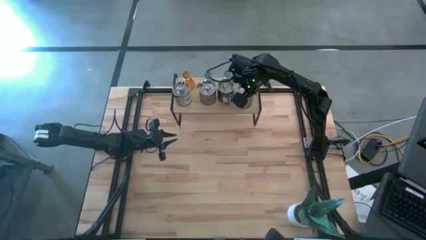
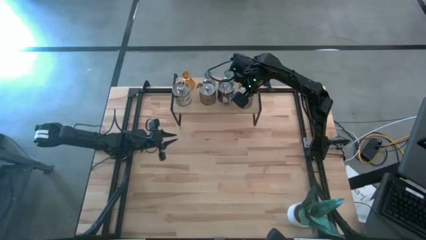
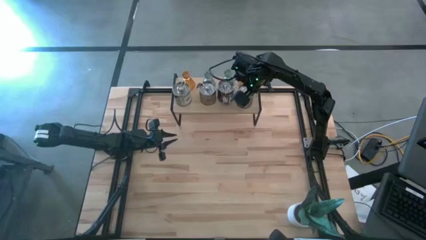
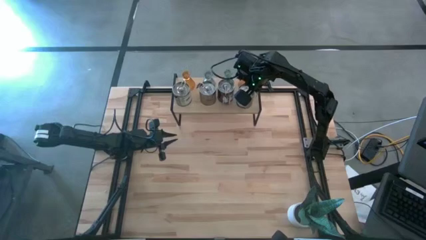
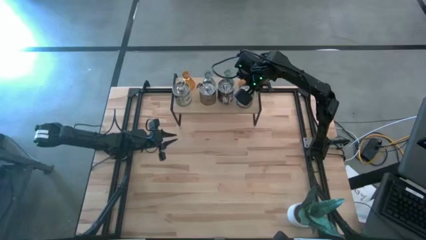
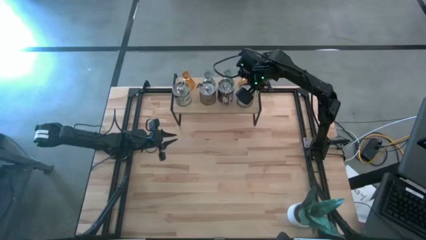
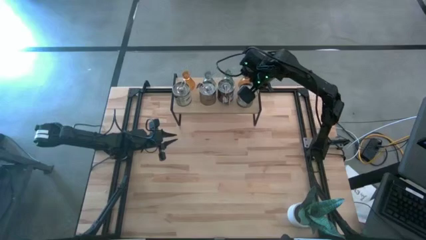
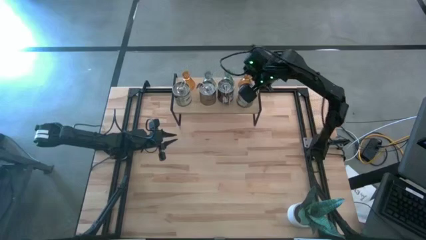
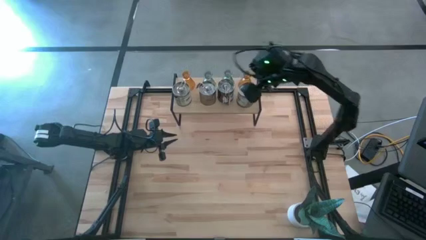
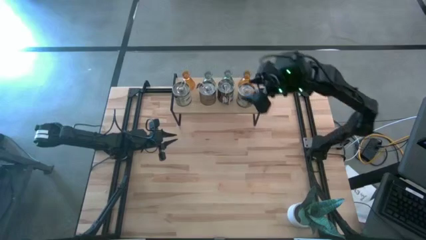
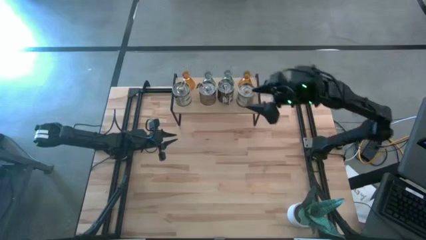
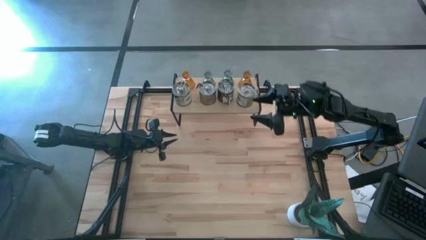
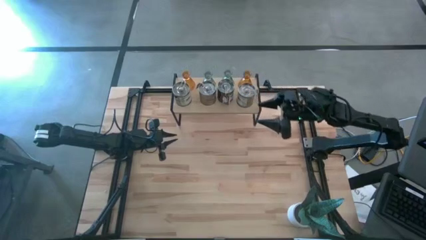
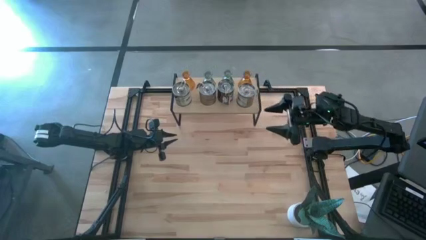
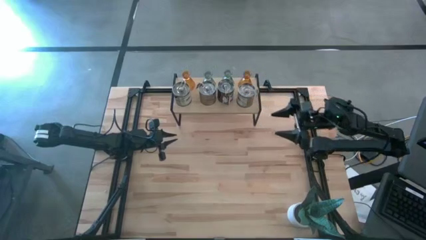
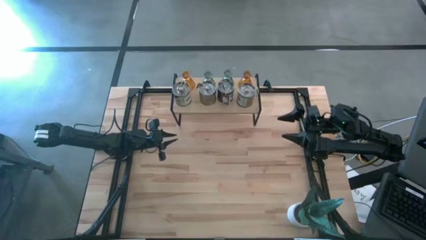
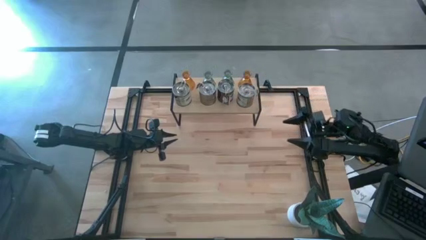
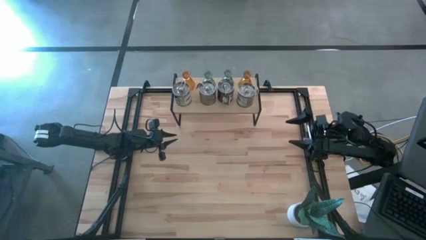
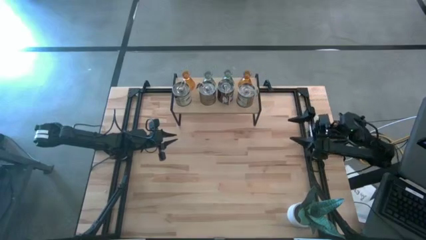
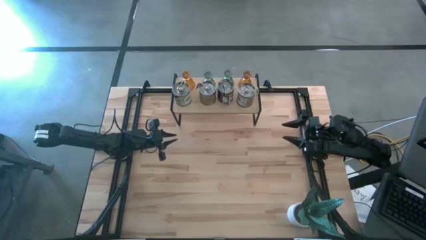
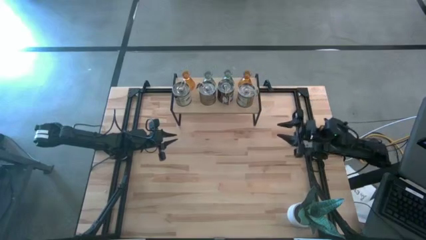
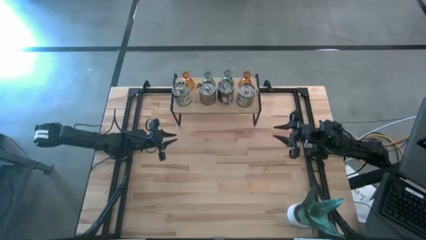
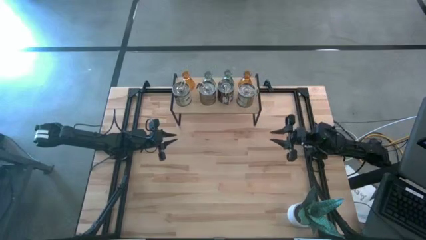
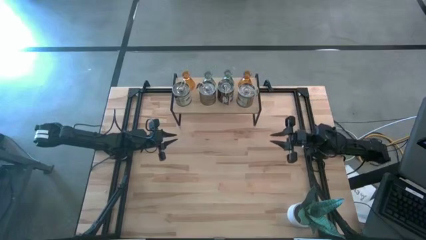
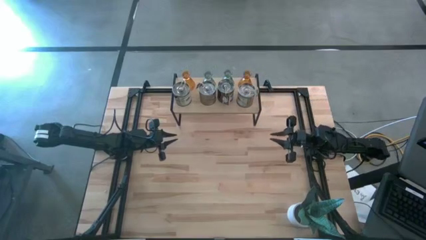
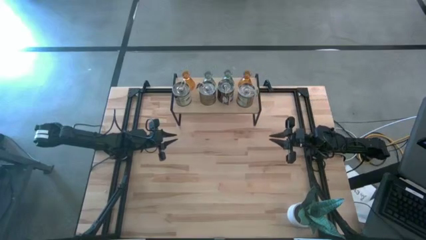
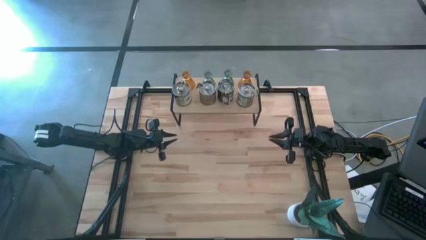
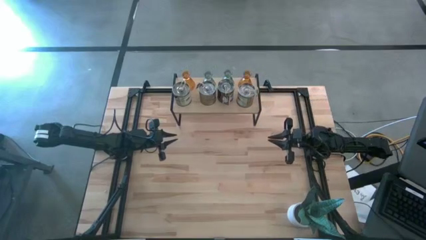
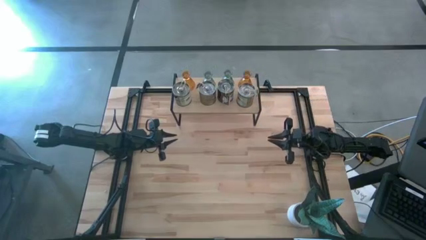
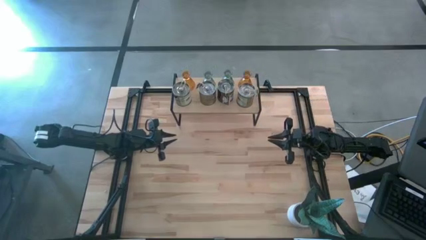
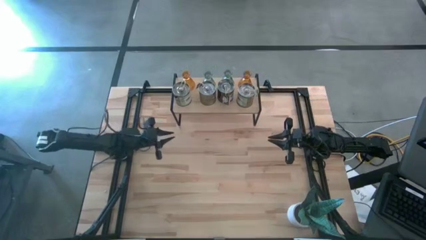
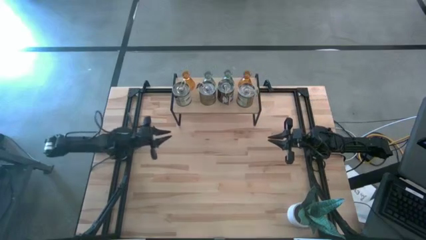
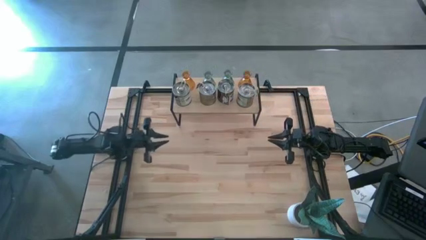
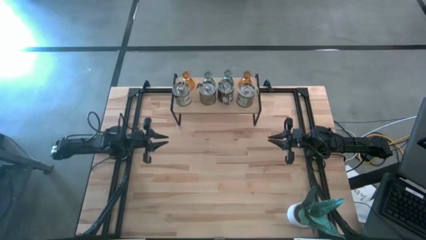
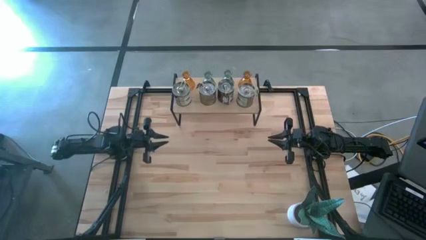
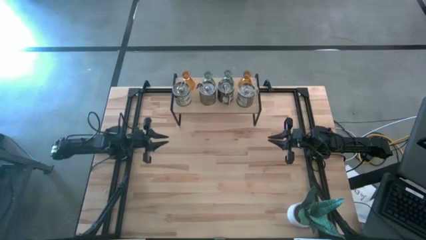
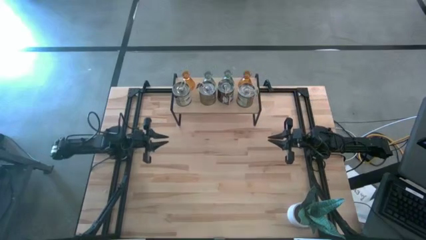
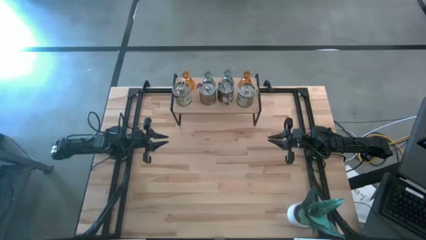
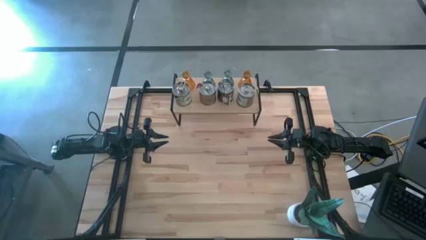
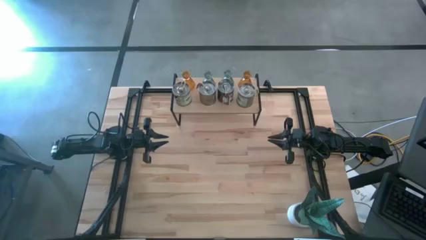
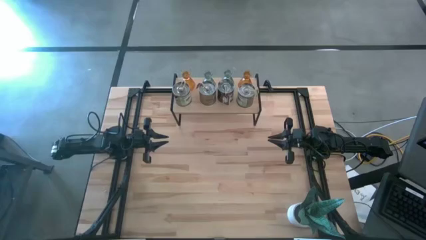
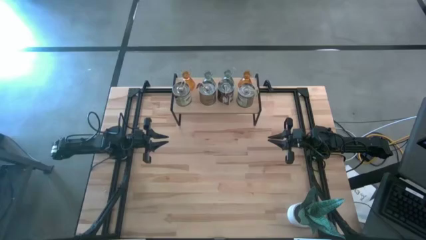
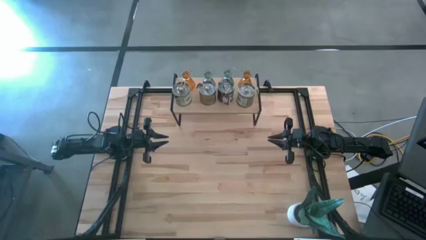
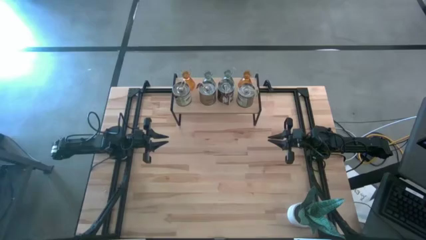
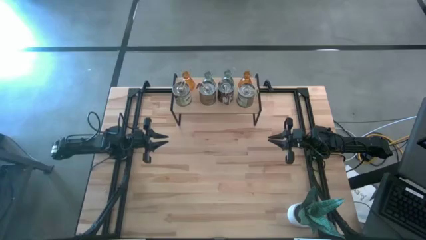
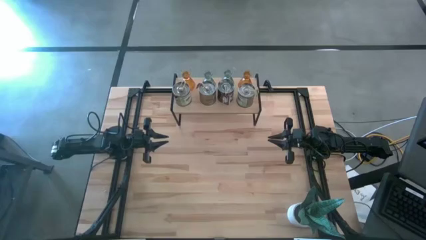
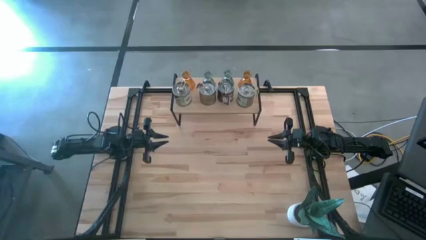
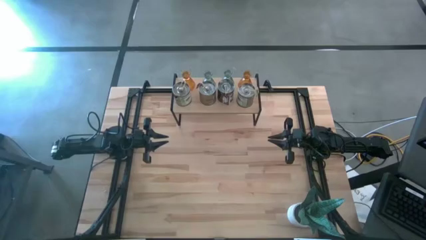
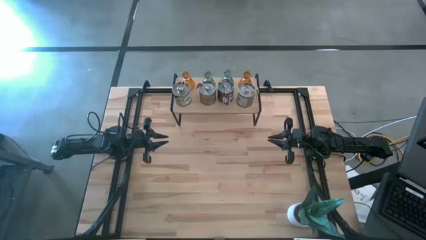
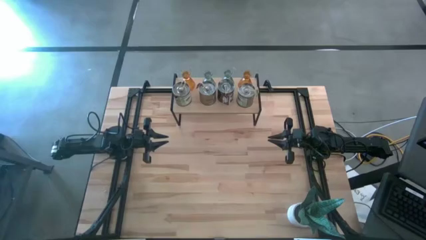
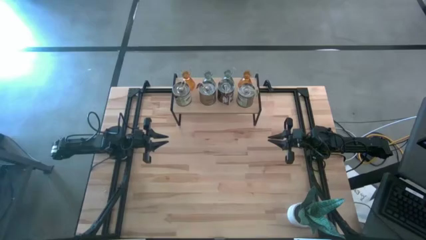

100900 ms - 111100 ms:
Task: Pick & Place candle stick holders
Return to Home Position

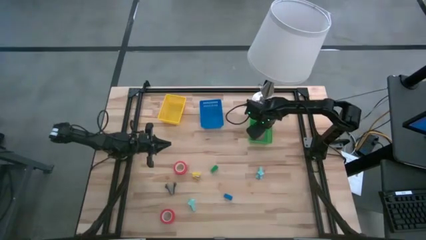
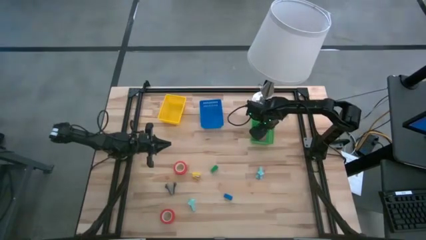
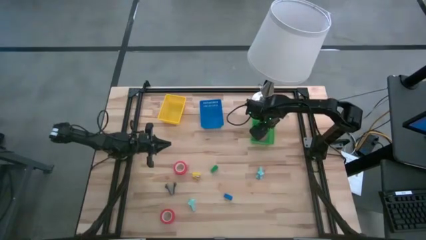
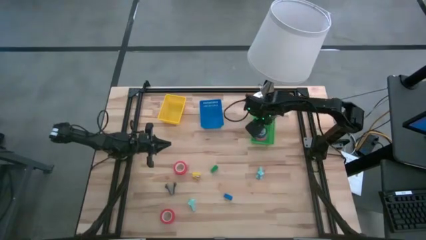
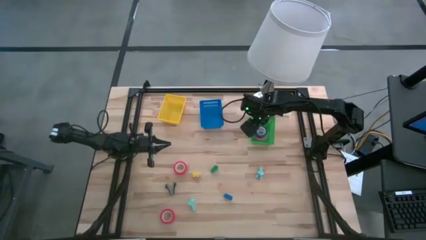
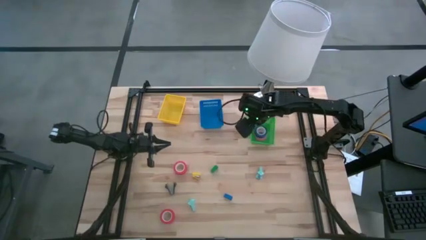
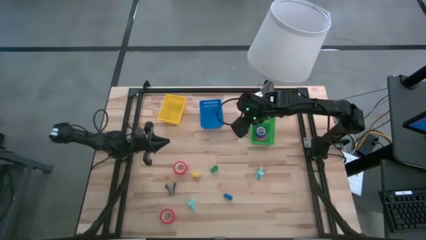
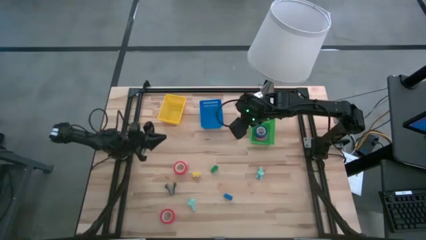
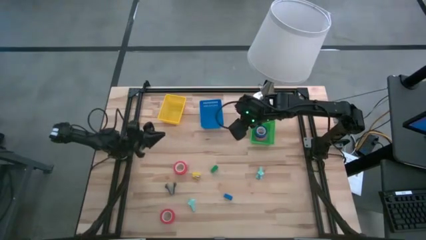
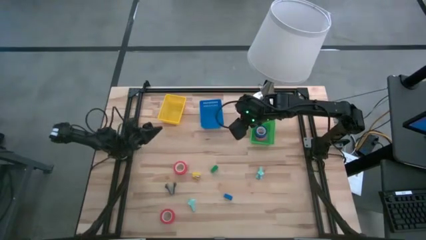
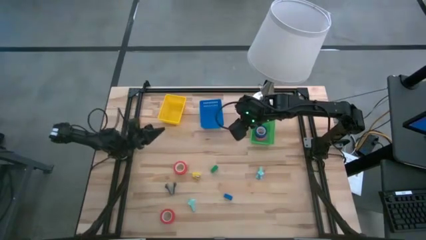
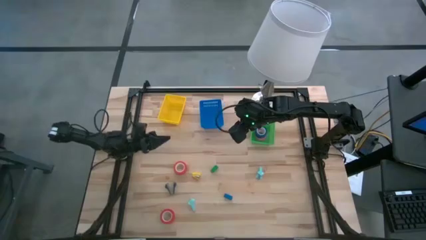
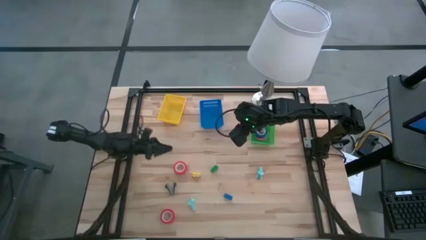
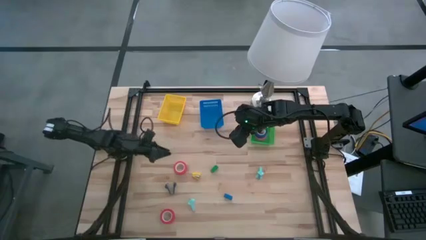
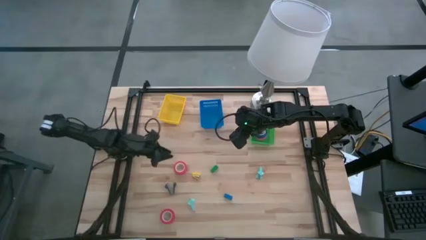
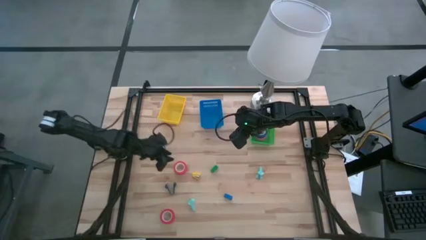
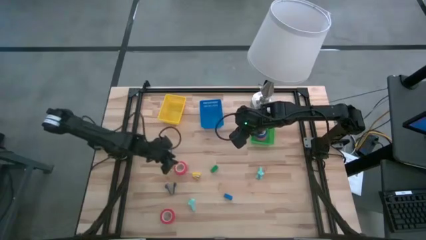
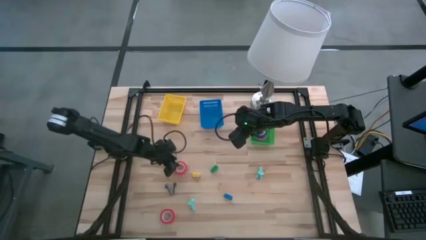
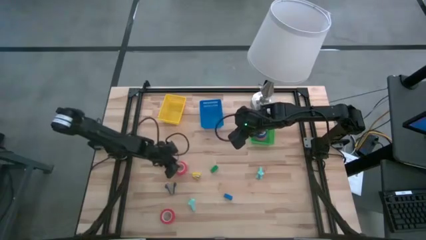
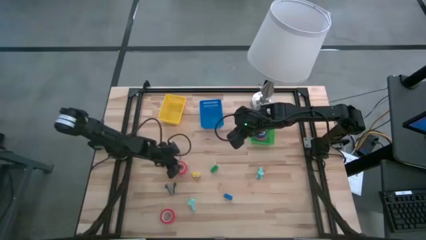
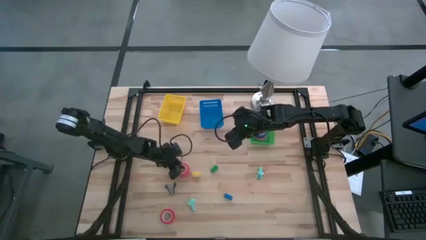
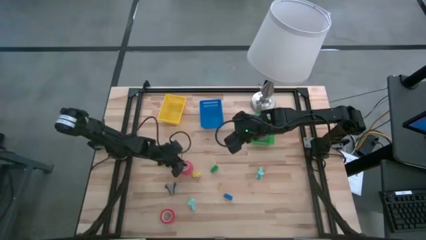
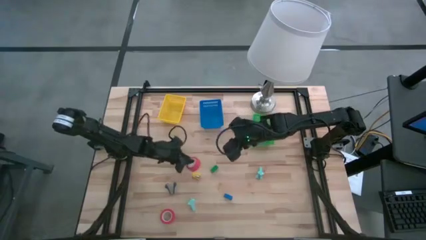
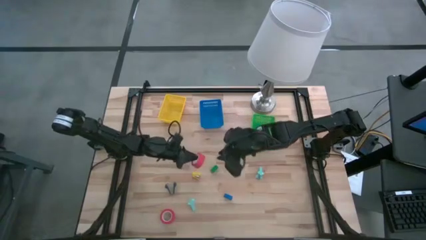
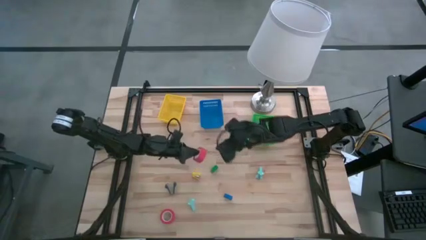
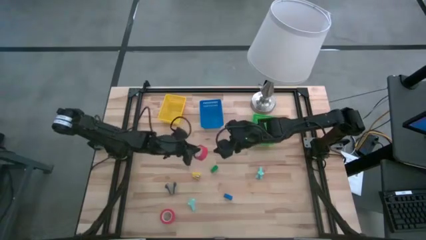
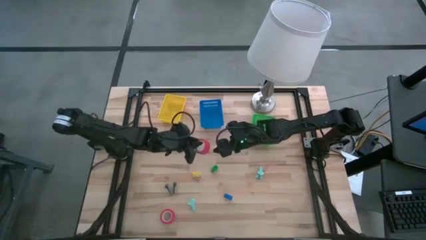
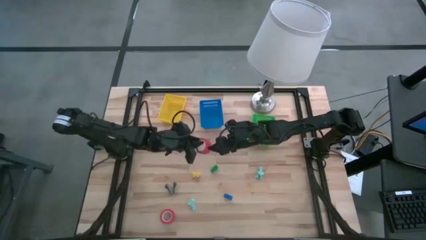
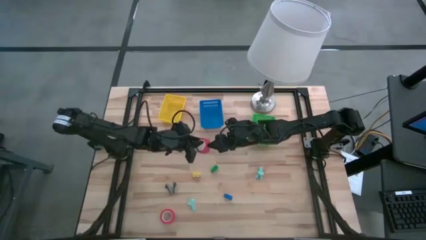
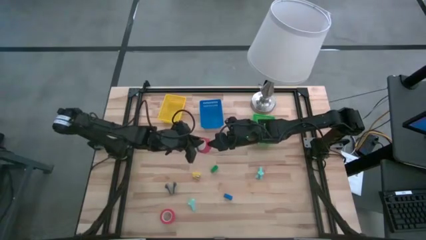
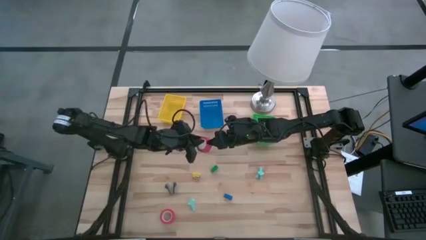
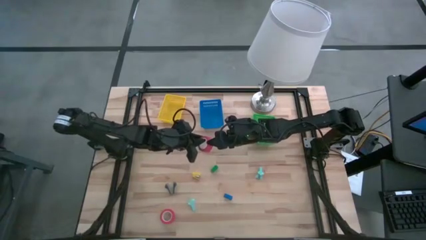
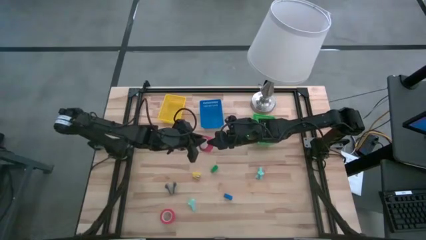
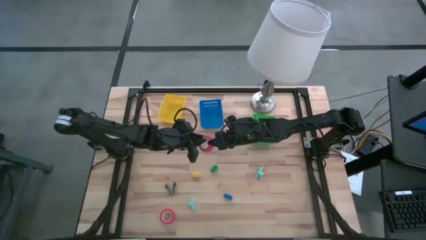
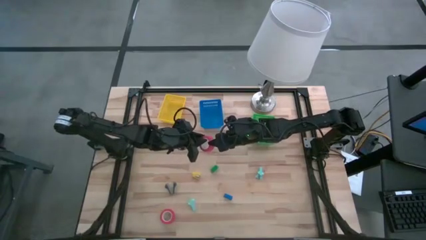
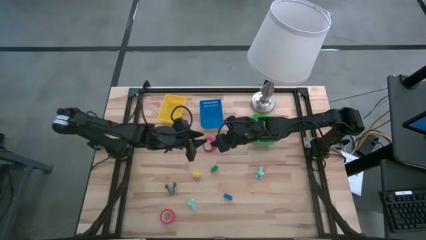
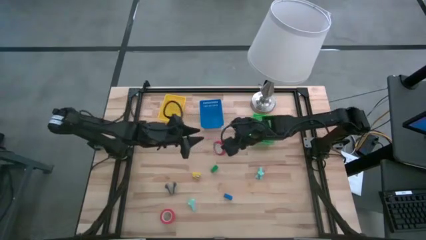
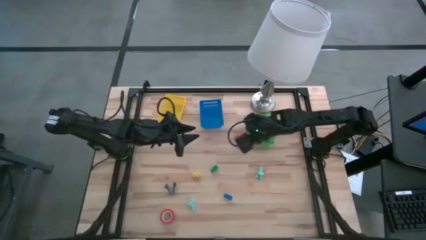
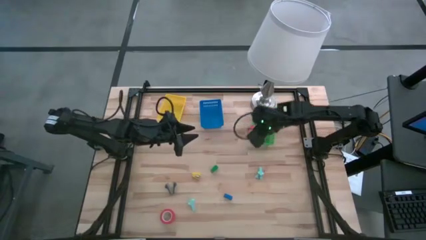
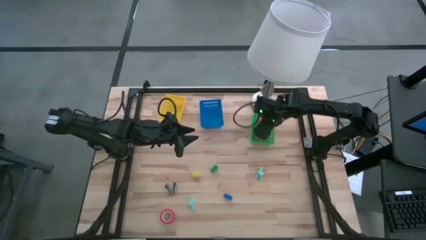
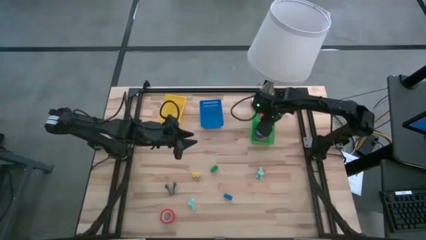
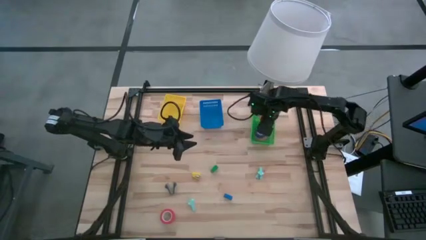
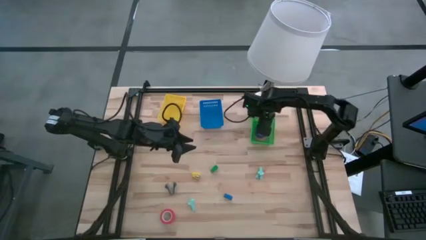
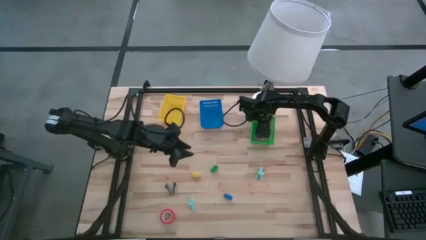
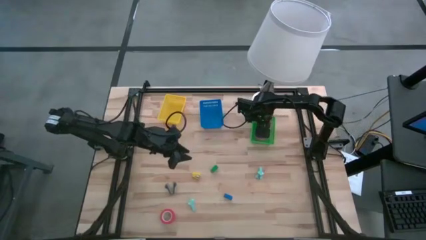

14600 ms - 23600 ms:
Task: Pick and place Stapler, Stapler remover, tape
Put the top orange tape into the green bin
